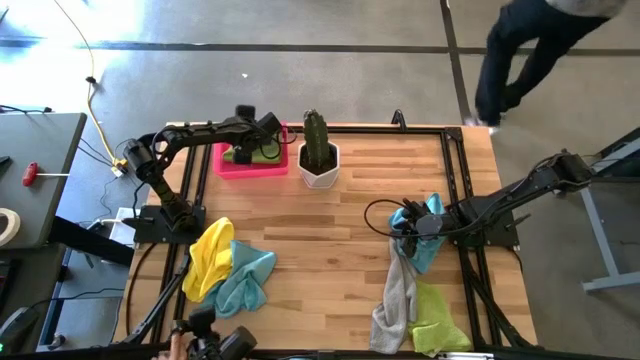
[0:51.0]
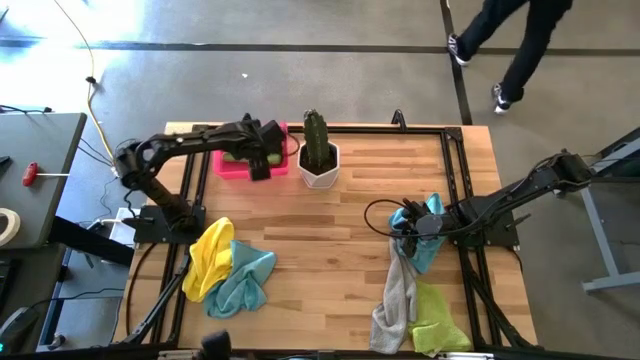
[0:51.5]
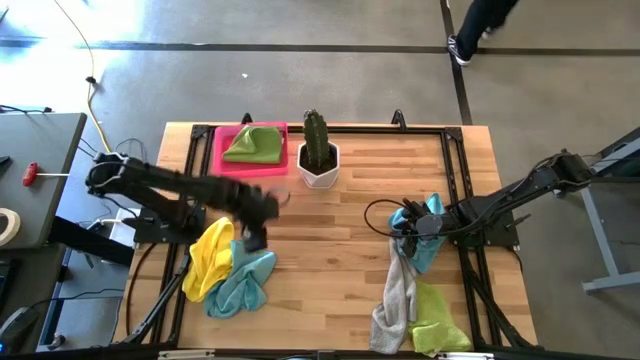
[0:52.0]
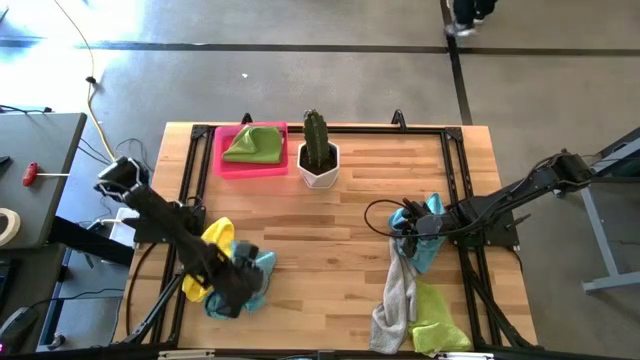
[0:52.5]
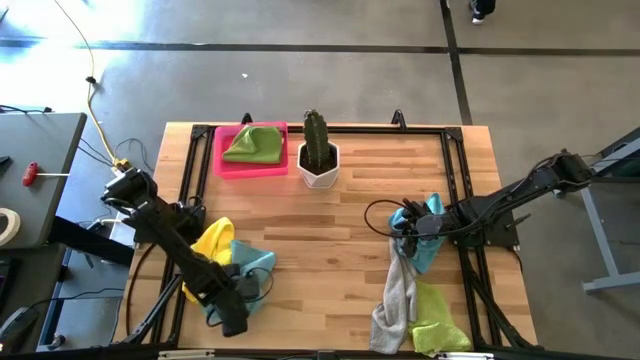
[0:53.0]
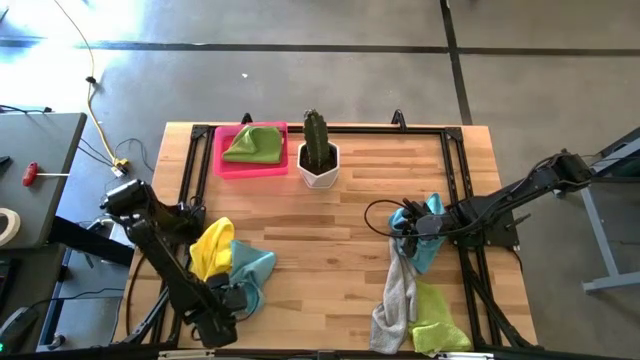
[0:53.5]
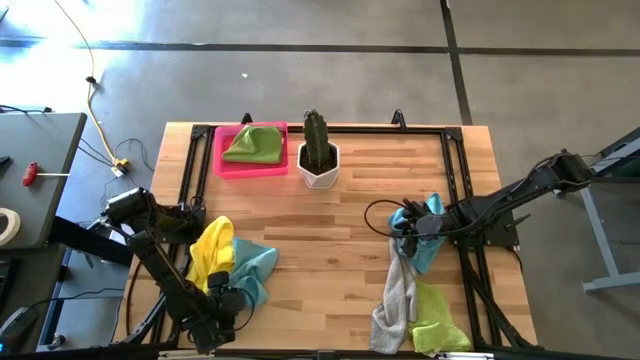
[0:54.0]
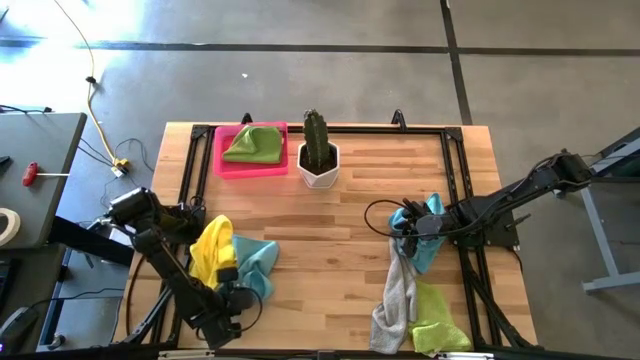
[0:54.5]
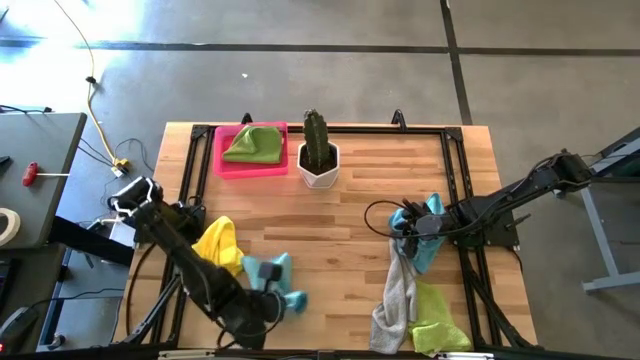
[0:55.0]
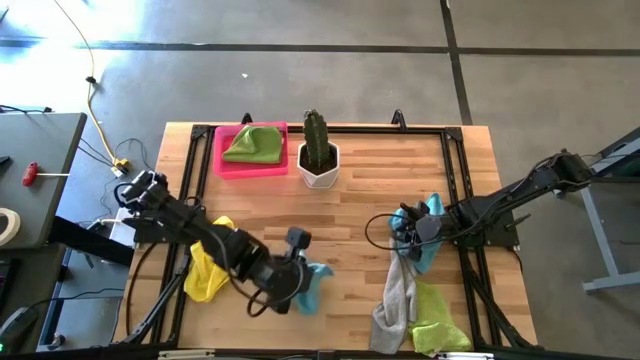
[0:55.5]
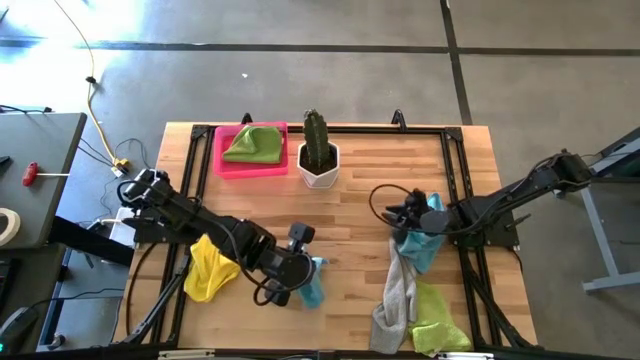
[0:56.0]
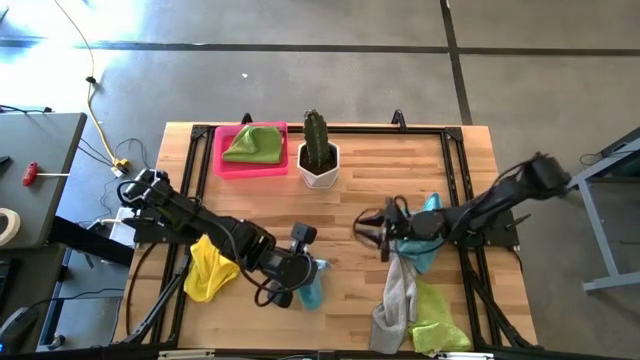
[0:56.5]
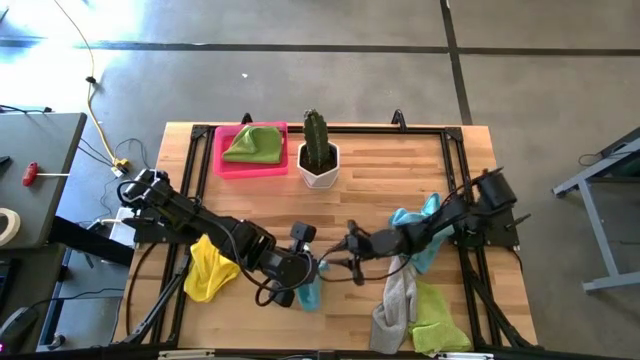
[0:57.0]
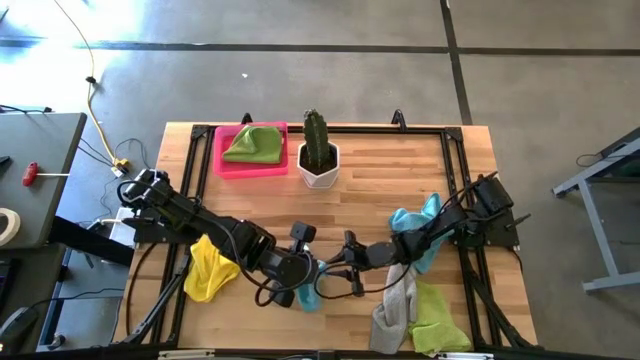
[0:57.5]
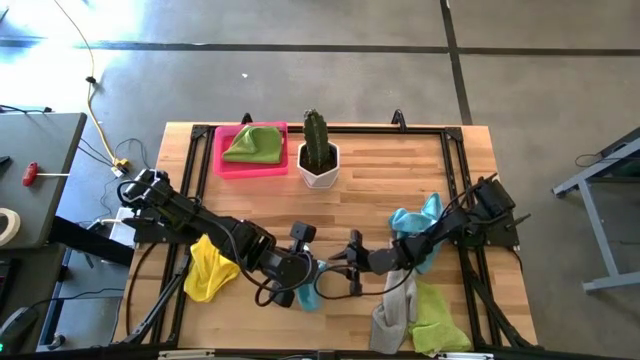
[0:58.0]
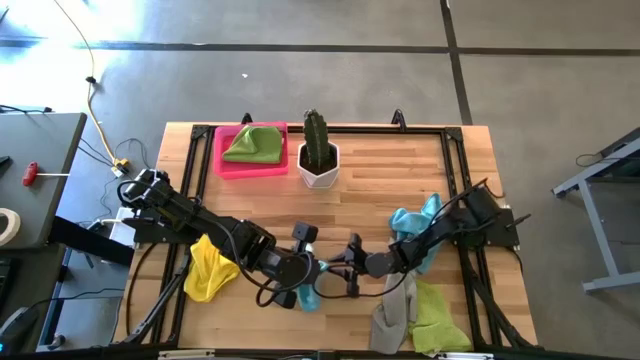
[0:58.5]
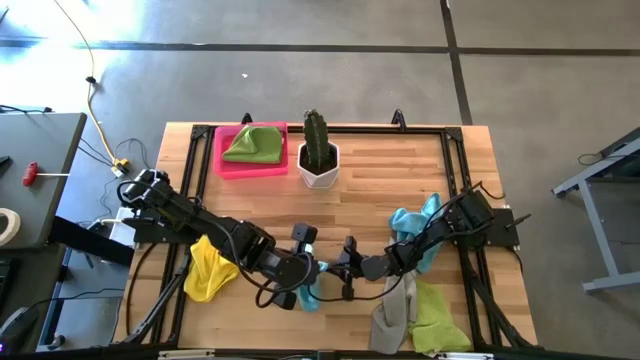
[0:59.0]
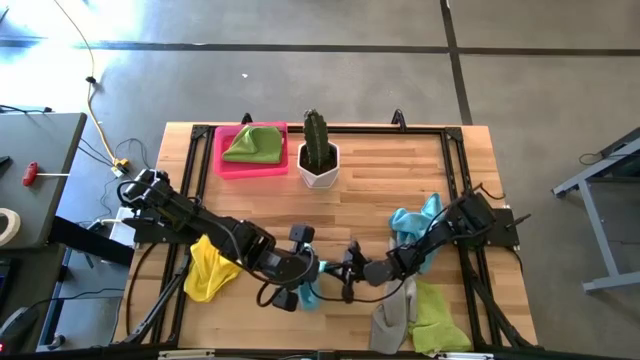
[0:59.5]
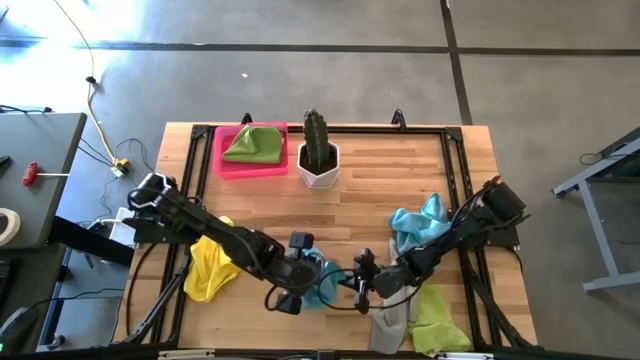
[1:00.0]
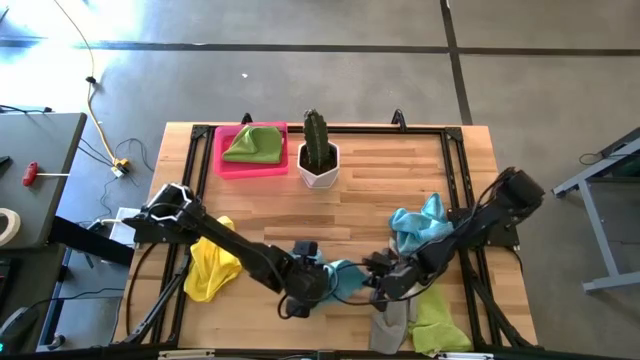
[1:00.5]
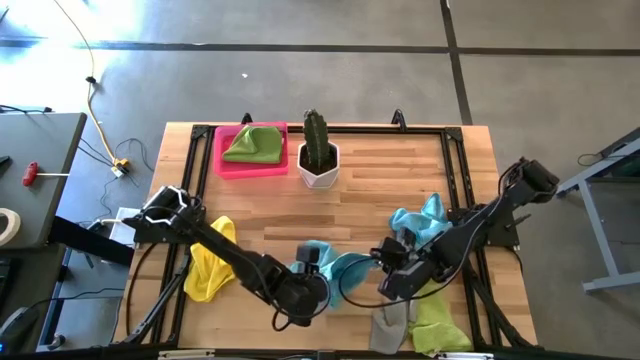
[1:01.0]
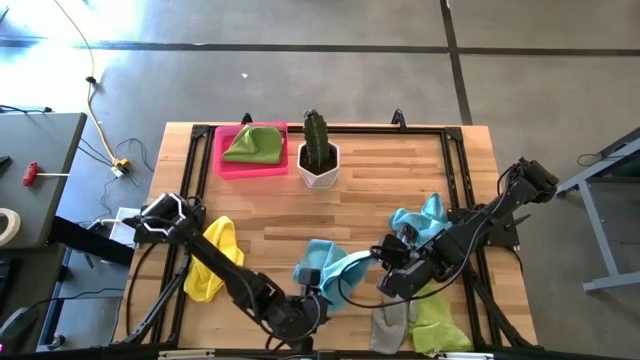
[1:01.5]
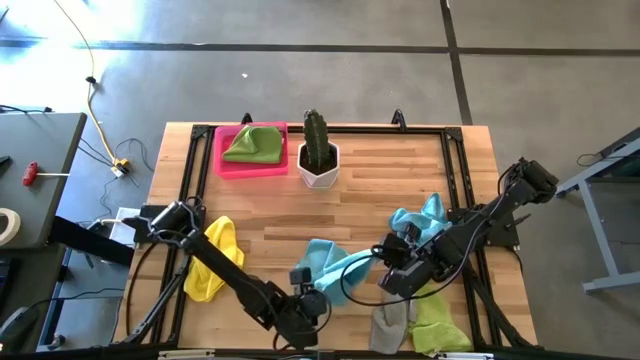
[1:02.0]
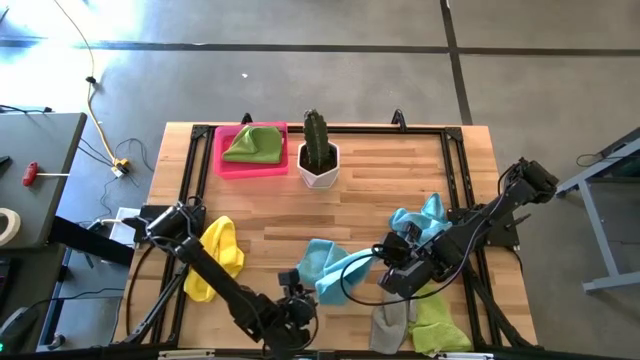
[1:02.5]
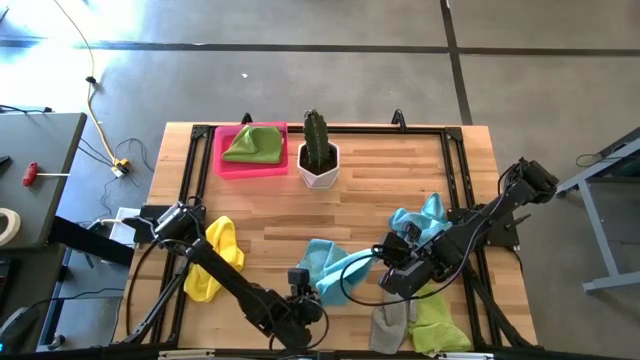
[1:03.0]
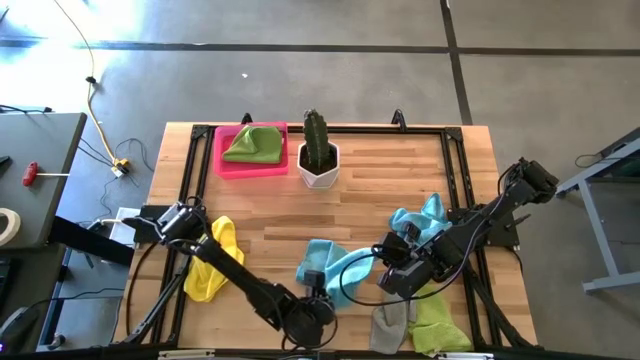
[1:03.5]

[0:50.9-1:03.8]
Task: Fold microfiber towels
Fold the left blue microfiber towel

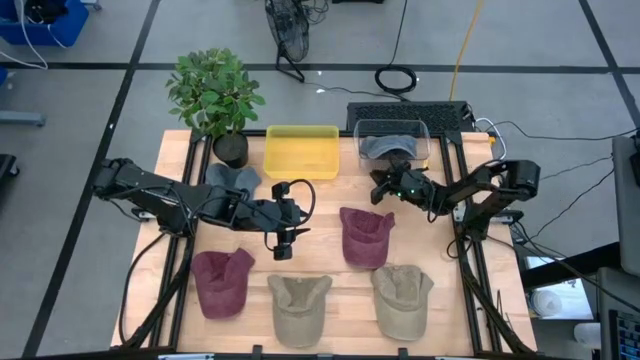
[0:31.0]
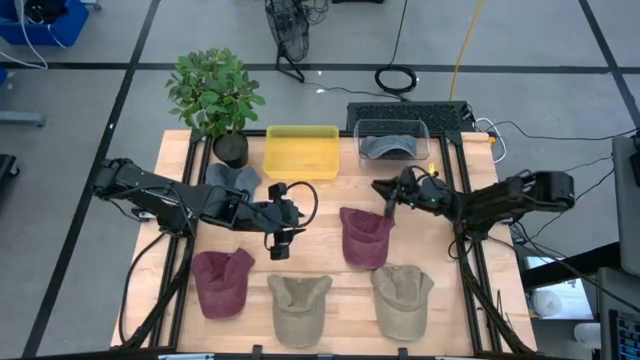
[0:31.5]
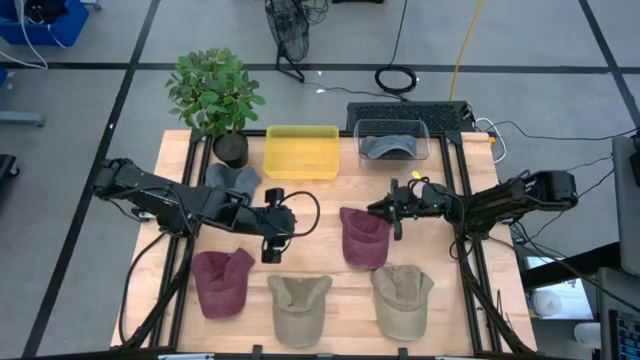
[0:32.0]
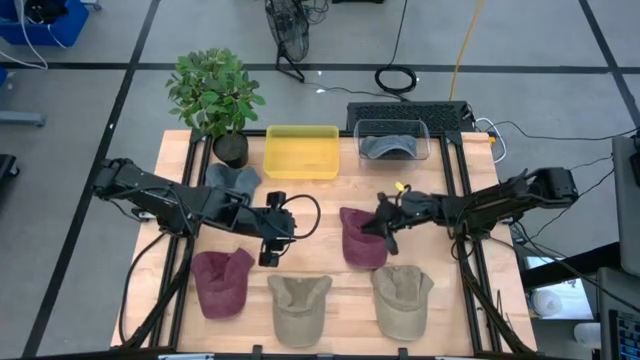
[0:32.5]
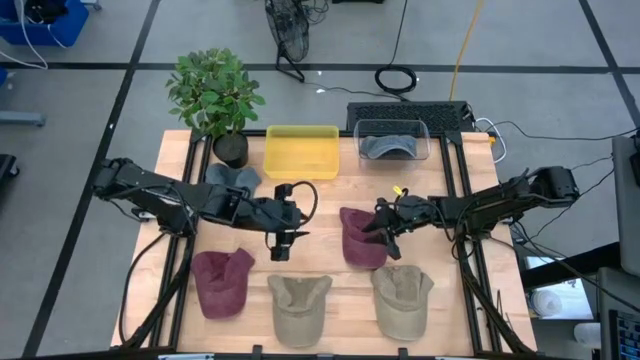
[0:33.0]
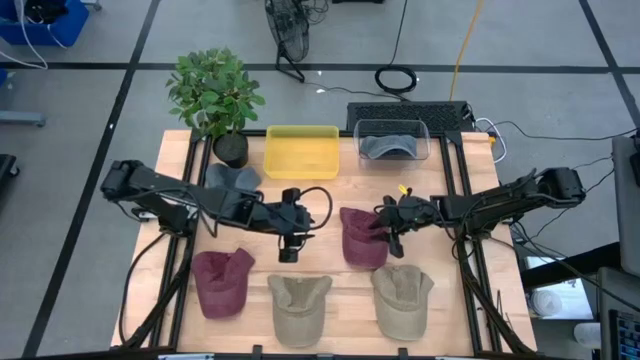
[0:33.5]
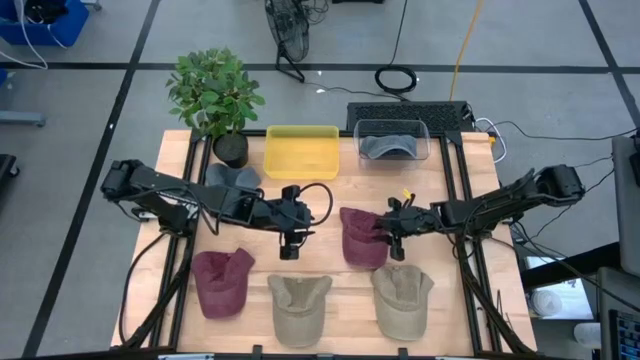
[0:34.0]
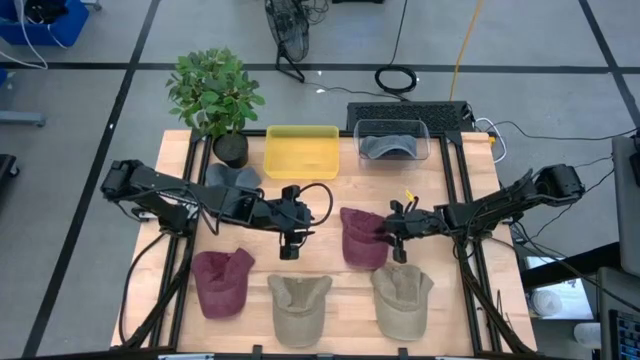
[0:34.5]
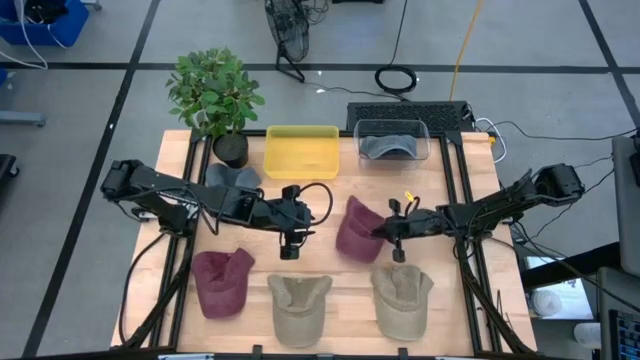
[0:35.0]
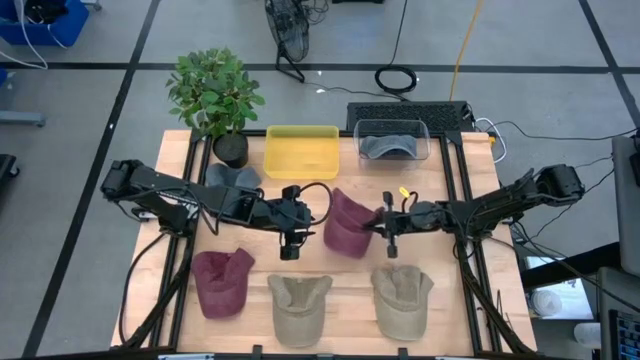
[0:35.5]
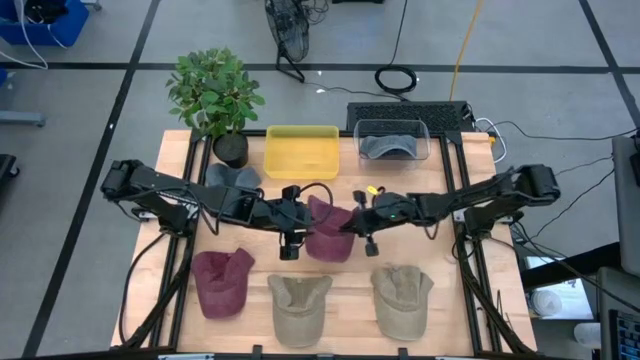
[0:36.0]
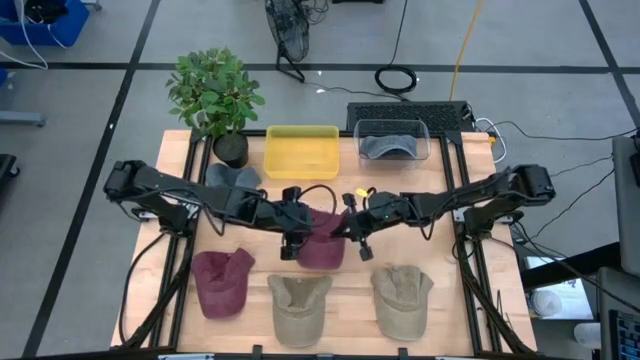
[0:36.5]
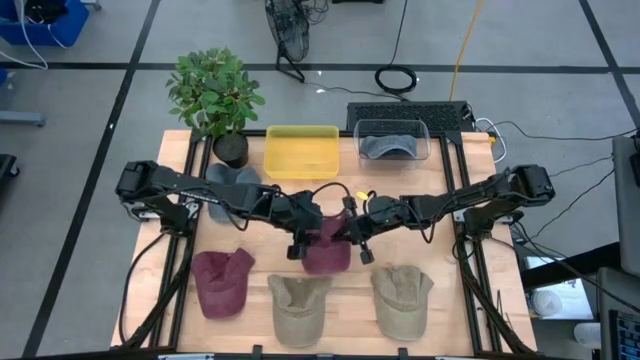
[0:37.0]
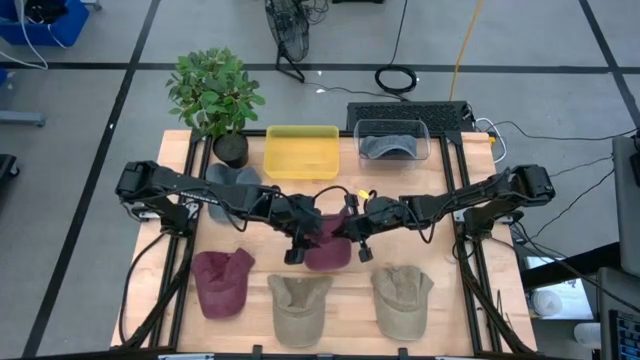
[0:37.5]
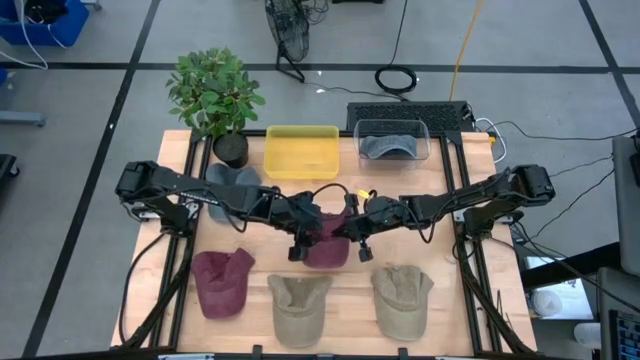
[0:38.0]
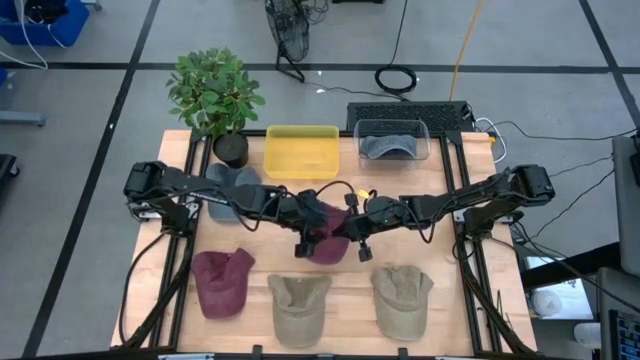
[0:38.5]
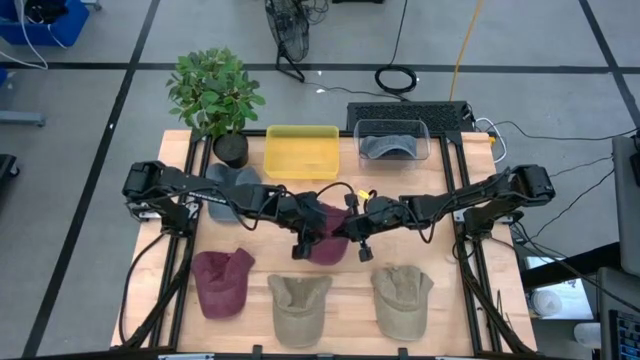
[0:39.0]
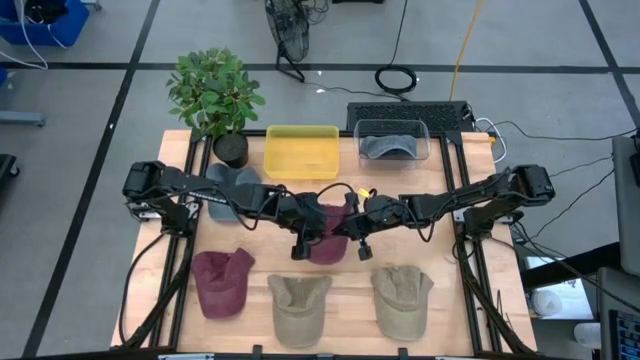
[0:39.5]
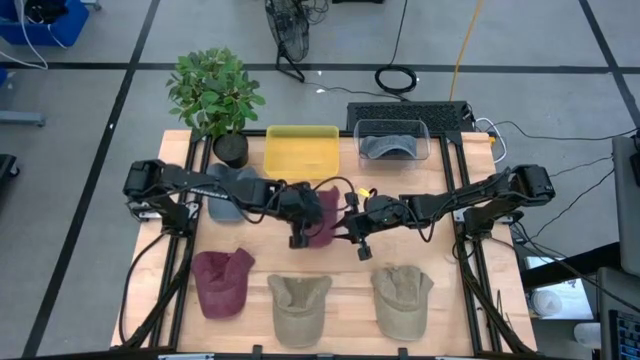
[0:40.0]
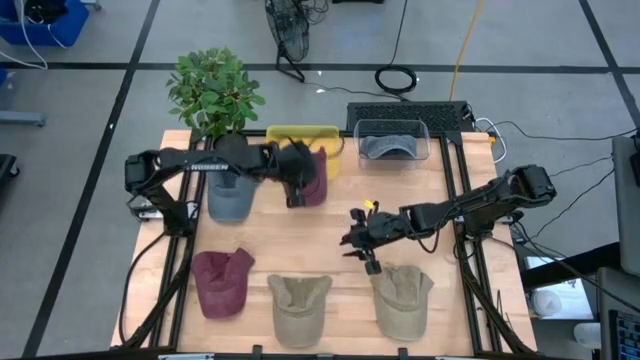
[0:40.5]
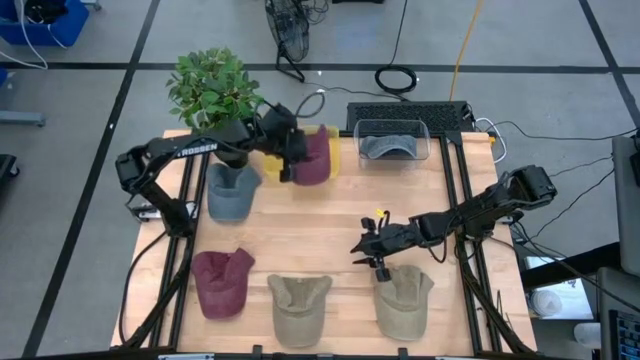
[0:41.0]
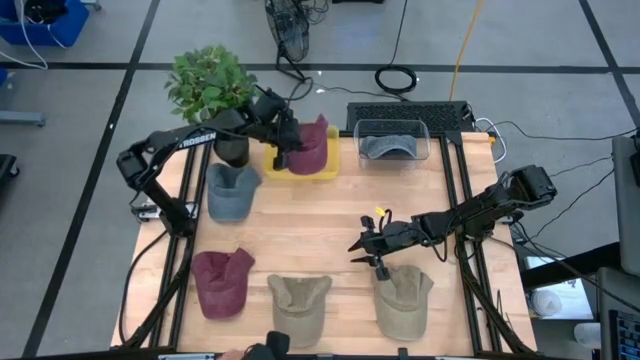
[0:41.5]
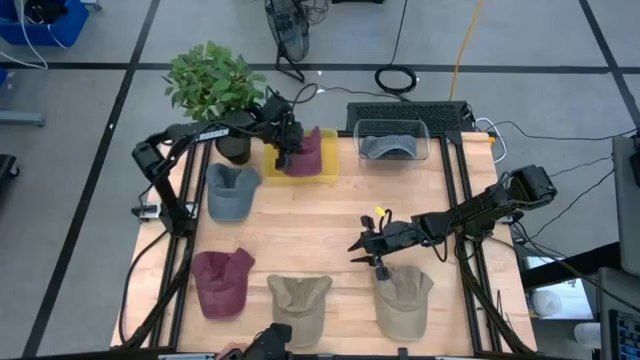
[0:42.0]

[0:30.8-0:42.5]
Task: Pick & Place hat
Put the right red cap into the yellow bin
